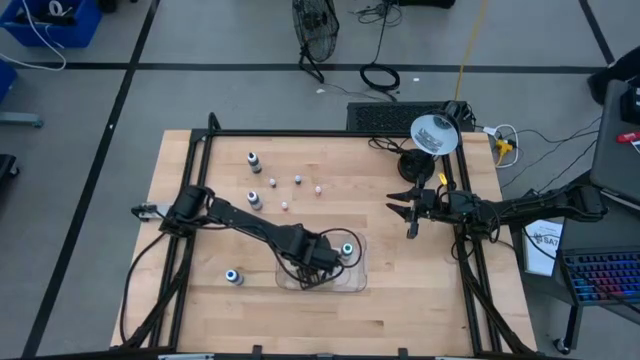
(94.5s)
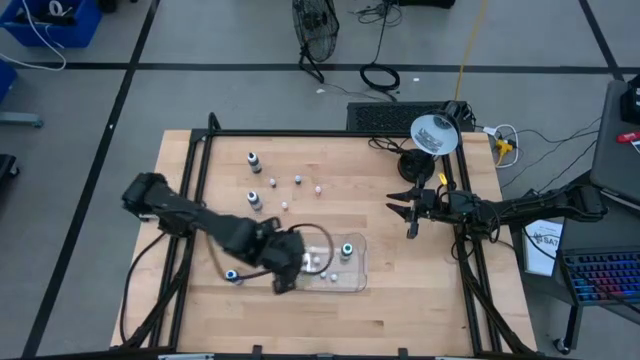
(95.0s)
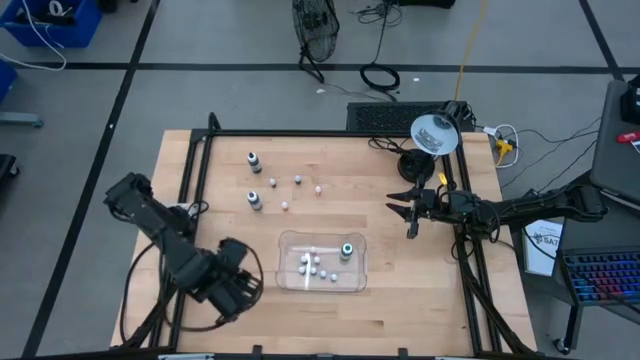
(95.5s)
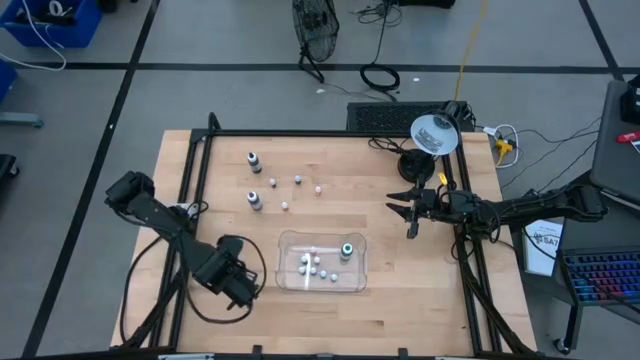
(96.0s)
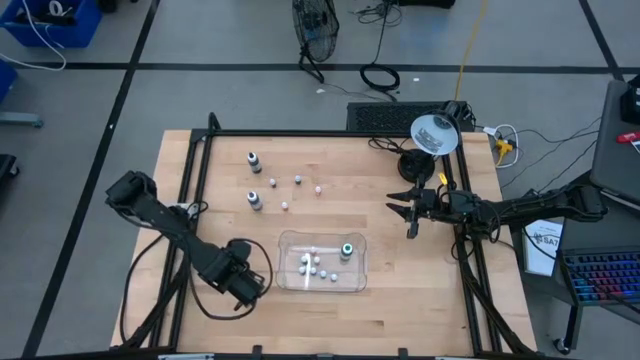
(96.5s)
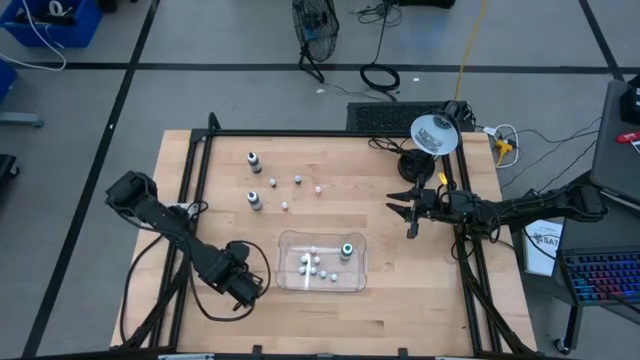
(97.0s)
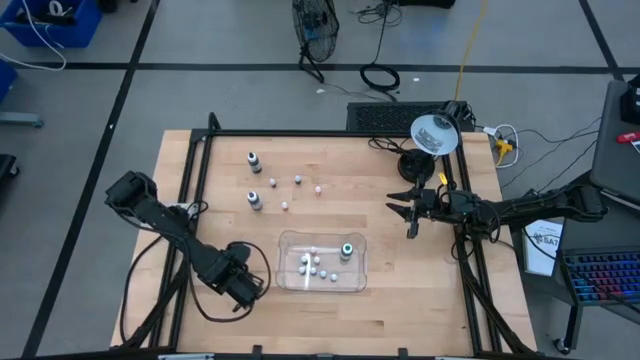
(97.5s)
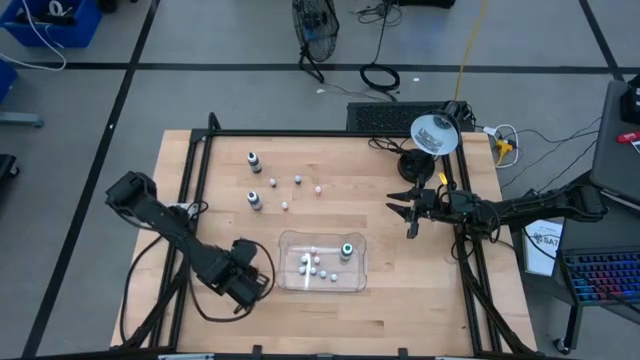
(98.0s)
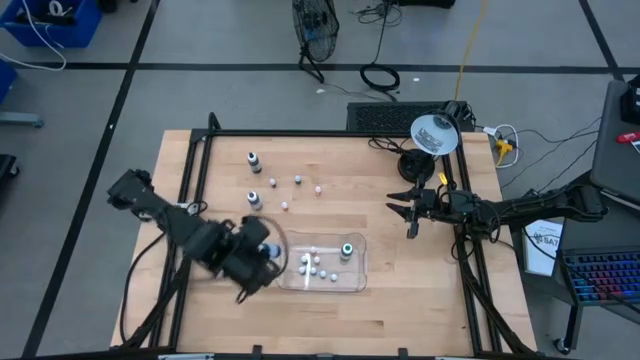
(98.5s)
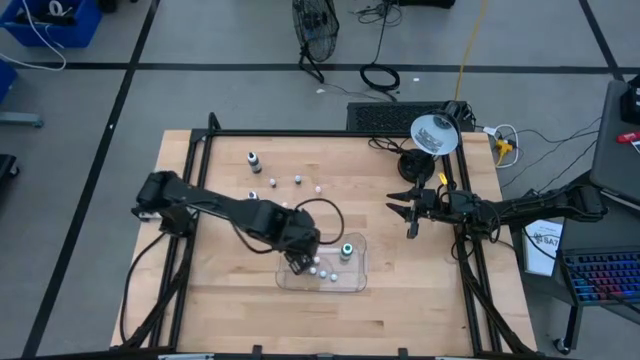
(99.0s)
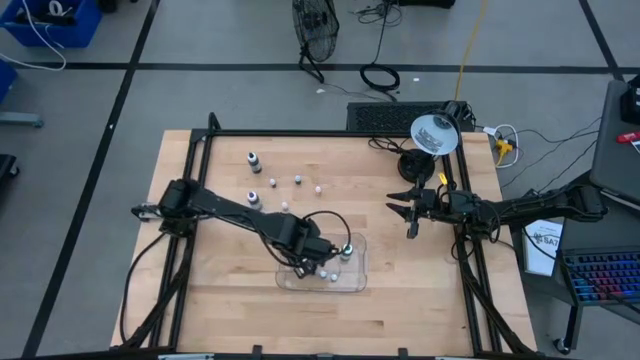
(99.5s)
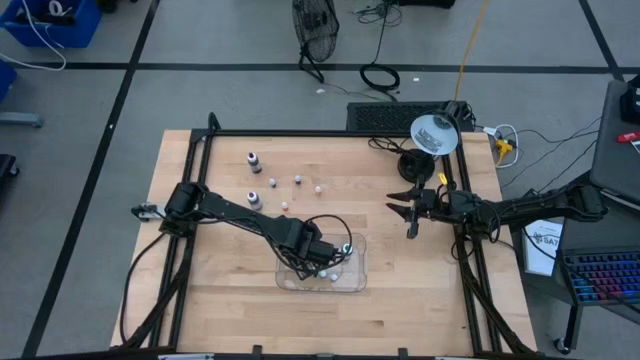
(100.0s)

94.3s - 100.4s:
Task: Pick & Place food coloring
Put the big blue food coloring bottle into the bin

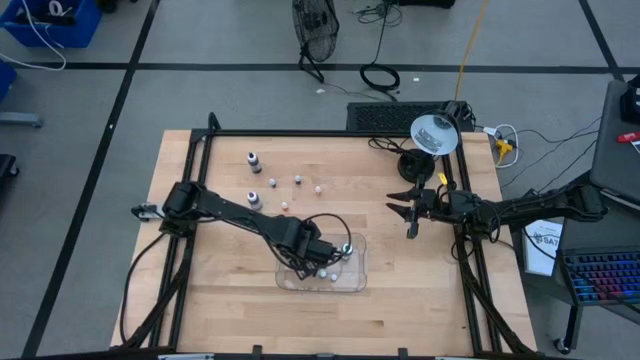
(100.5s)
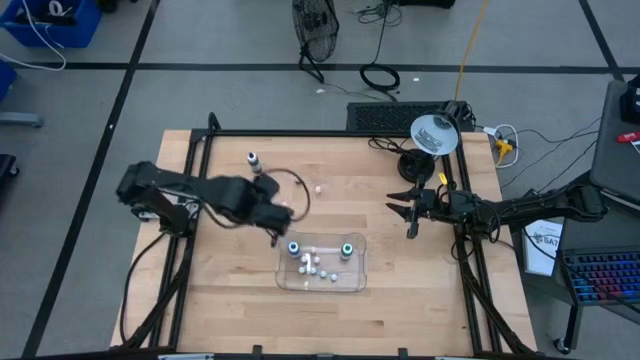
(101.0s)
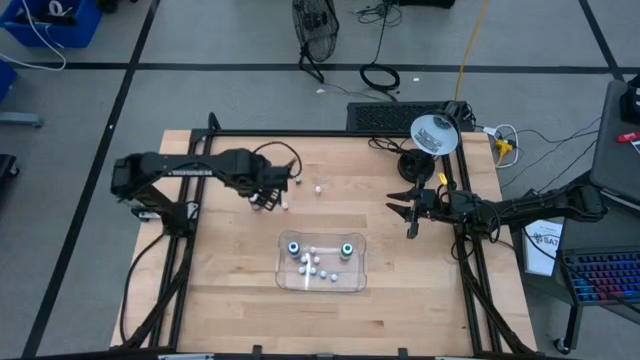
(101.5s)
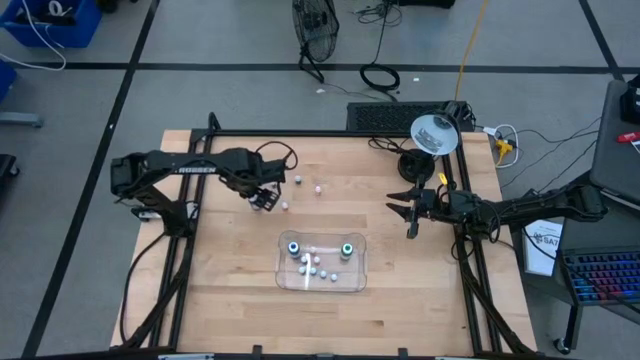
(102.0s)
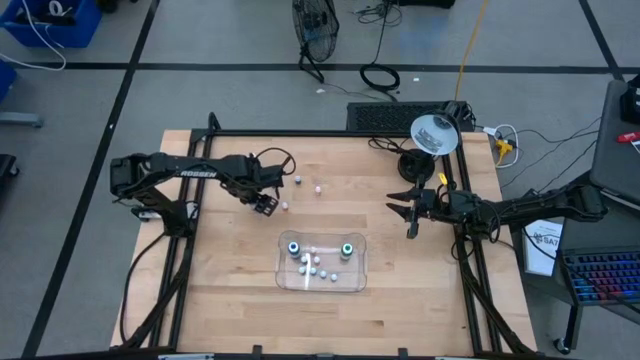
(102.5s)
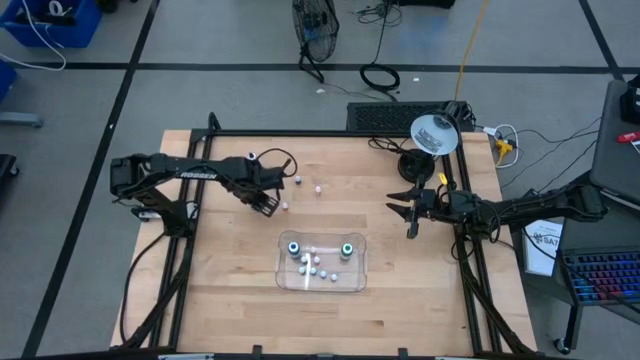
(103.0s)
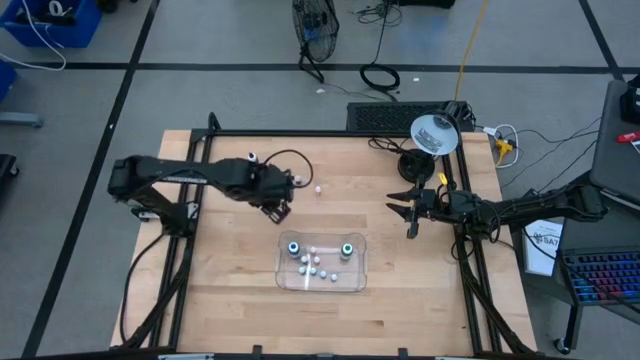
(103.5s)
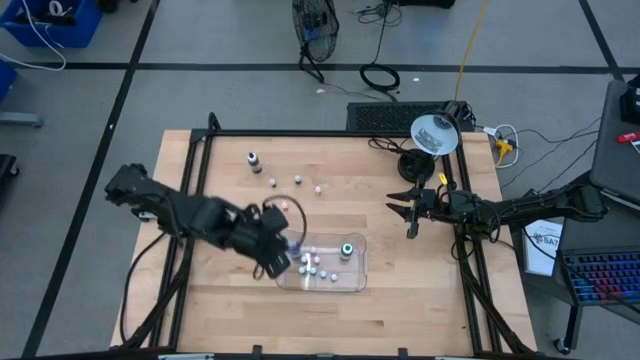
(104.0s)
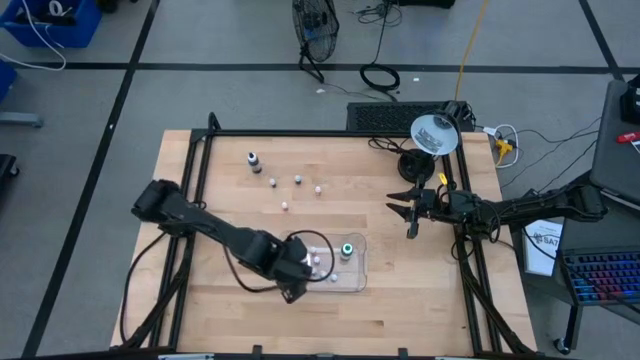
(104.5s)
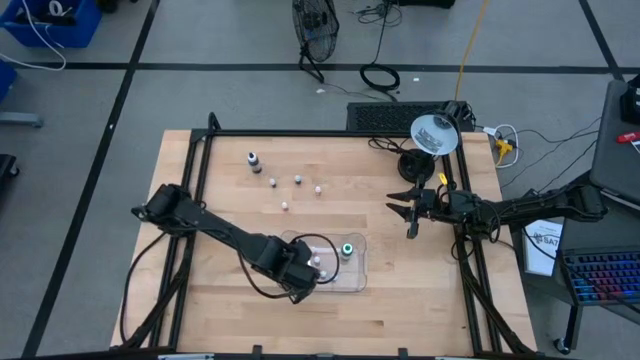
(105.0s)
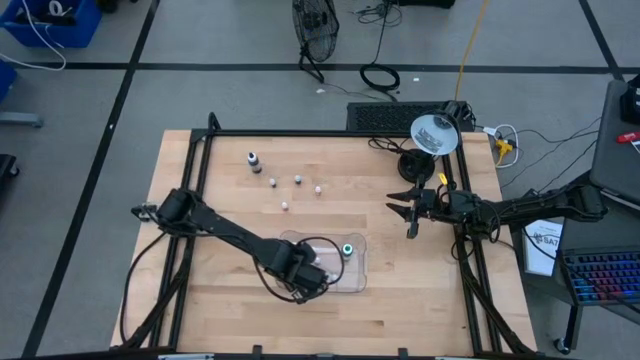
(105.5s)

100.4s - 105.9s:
Put the big purple food coloring bottle into the bin

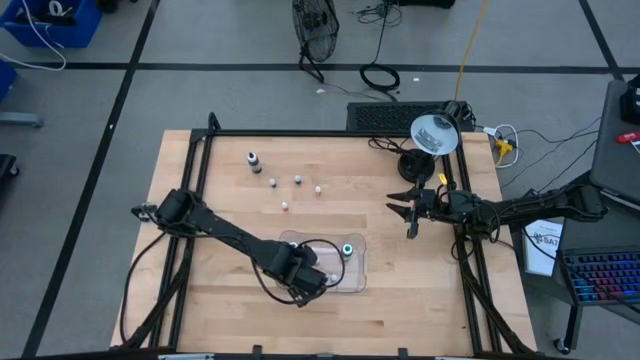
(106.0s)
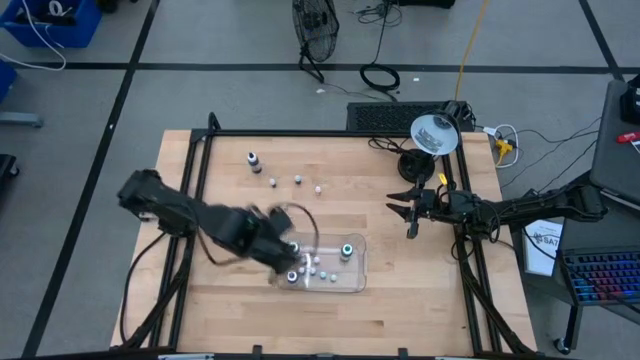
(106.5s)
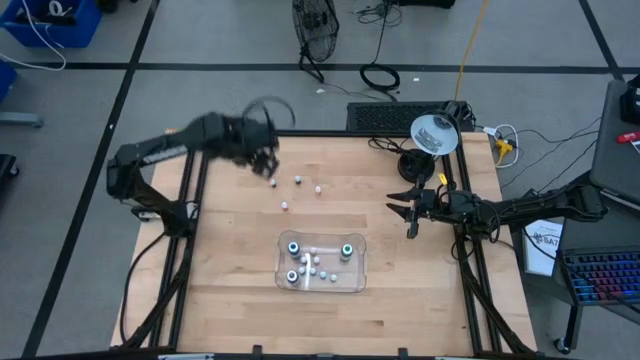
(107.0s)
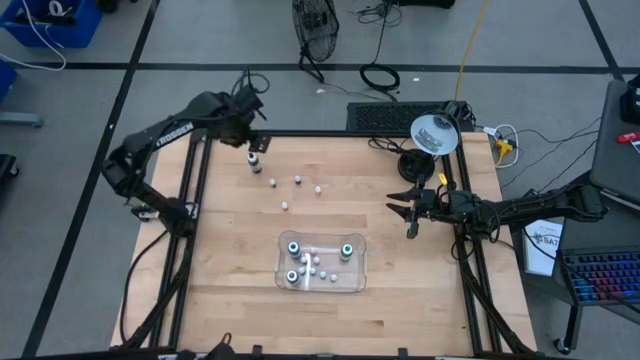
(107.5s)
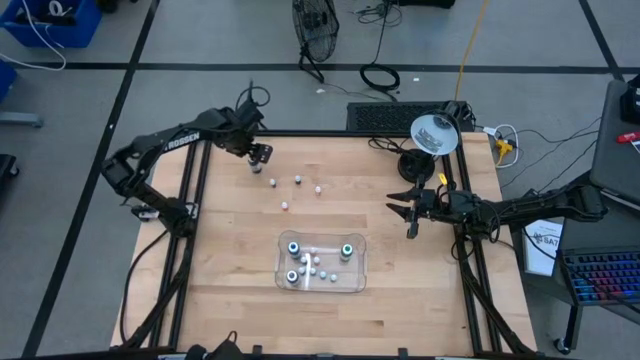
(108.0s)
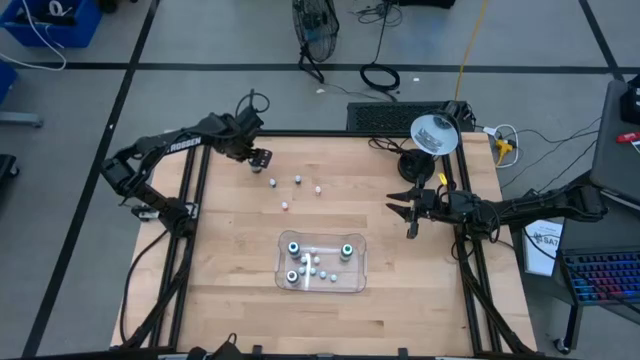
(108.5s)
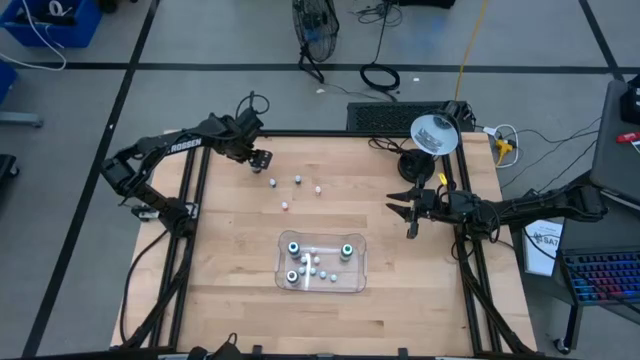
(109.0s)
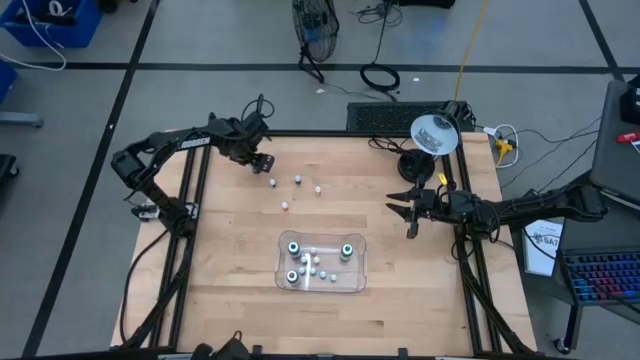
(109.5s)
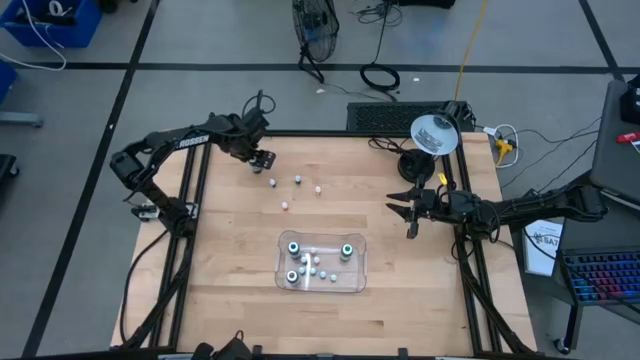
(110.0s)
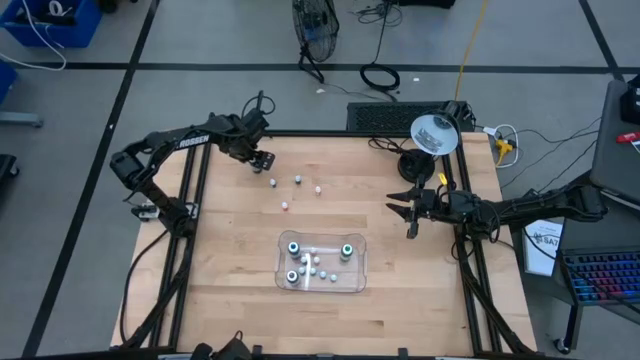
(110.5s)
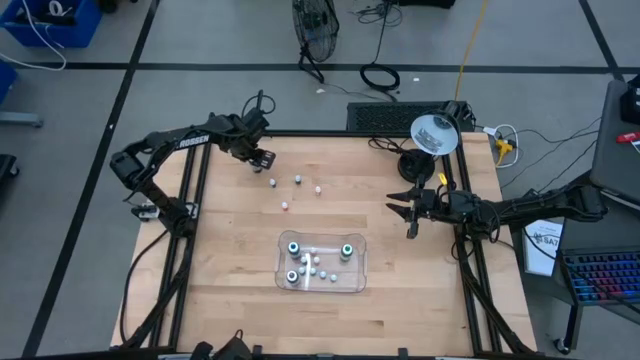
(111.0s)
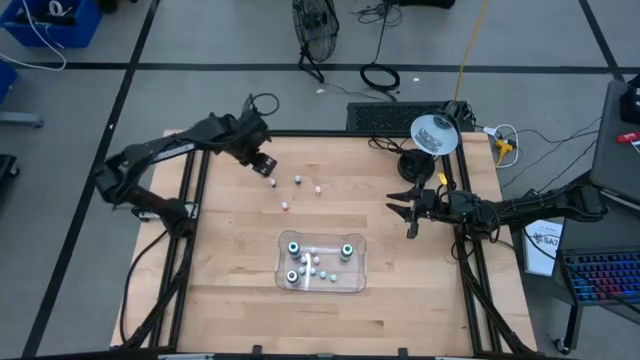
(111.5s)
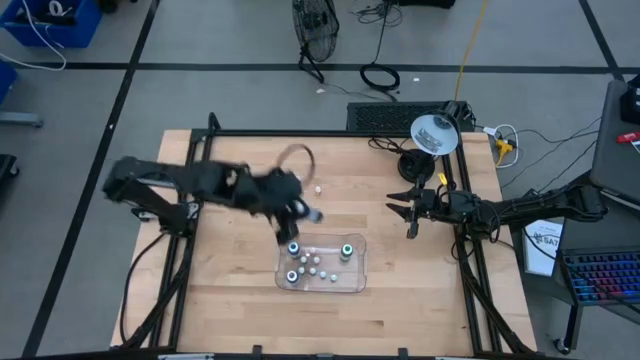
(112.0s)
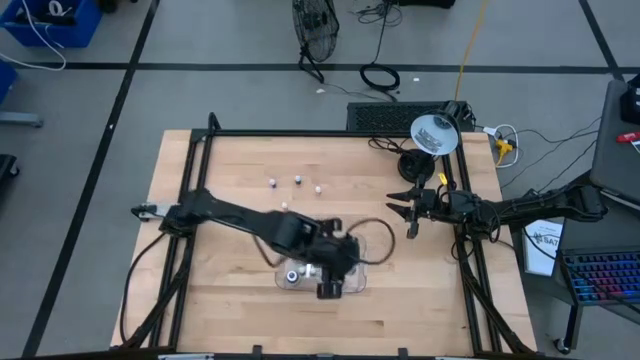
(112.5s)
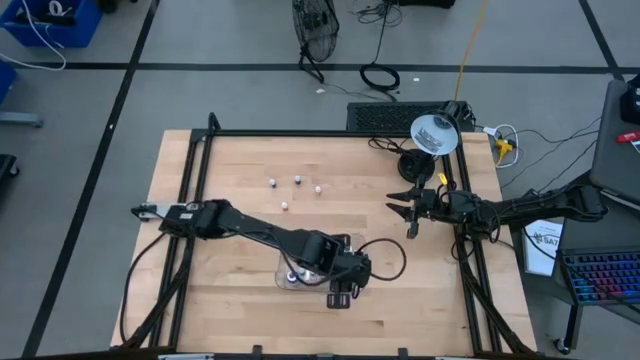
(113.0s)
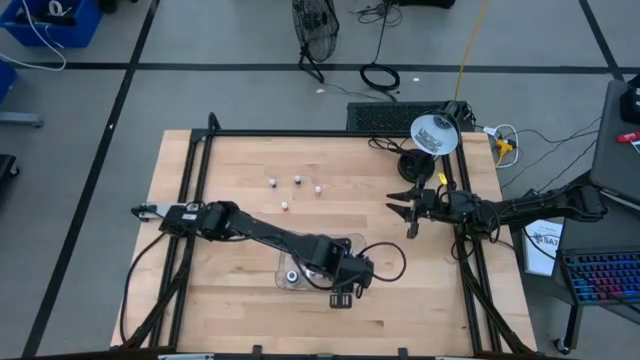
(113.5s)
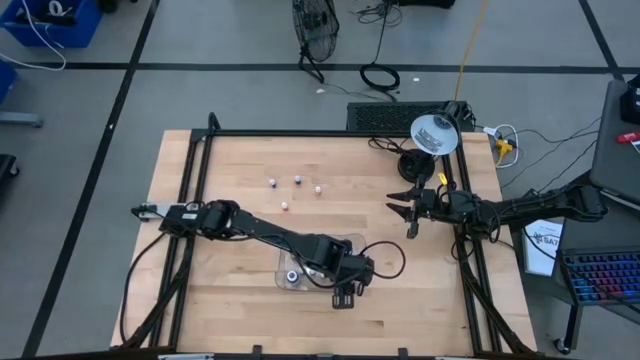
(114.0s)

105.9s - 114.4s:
Put the big black food coloring bottle into the bin

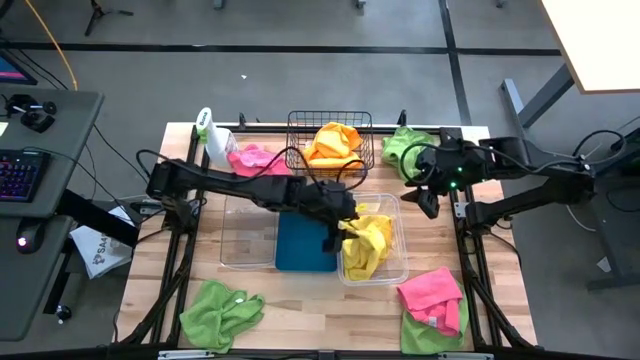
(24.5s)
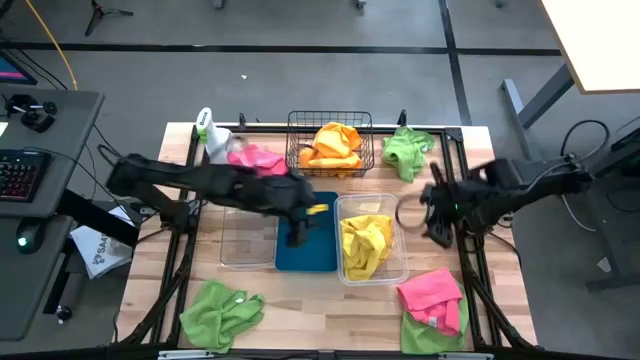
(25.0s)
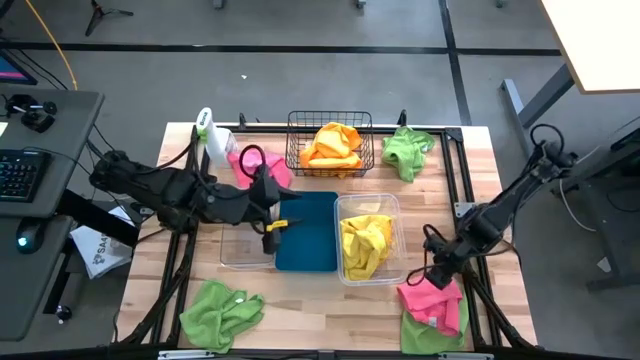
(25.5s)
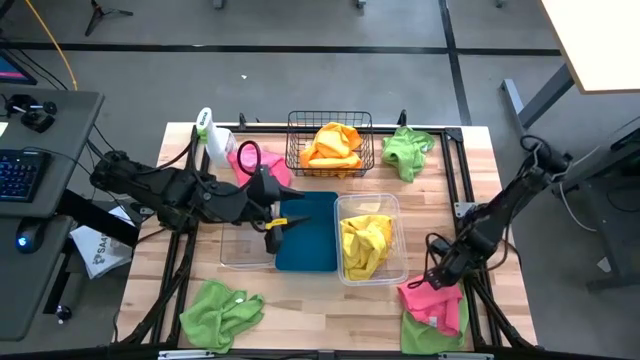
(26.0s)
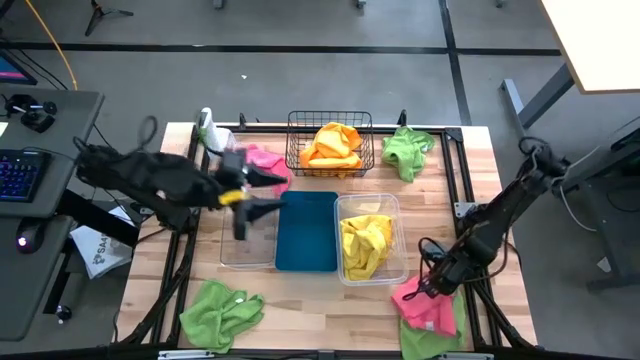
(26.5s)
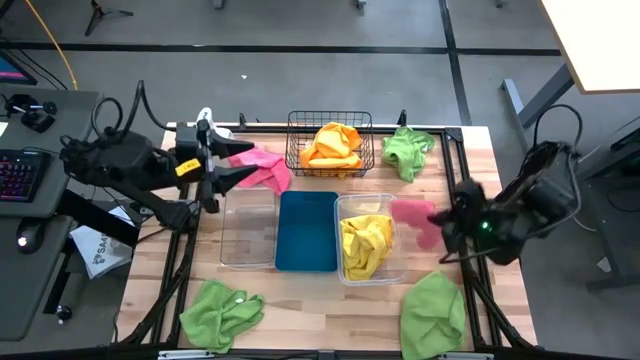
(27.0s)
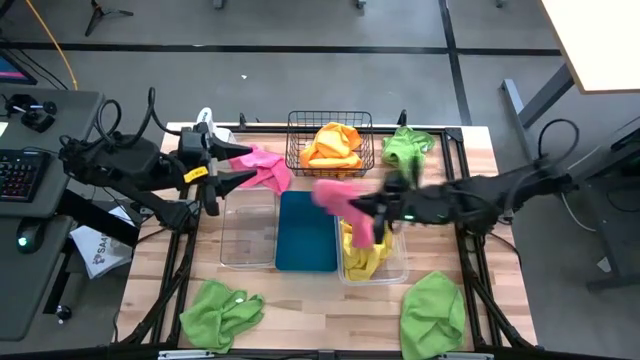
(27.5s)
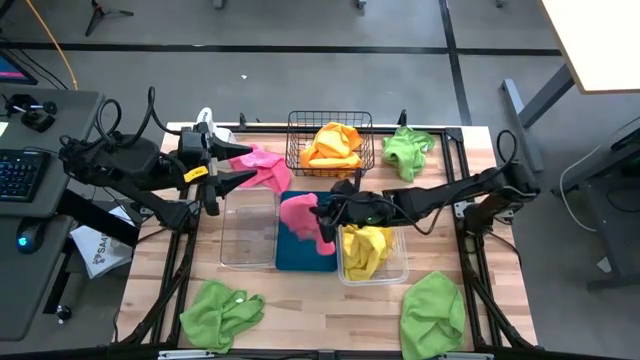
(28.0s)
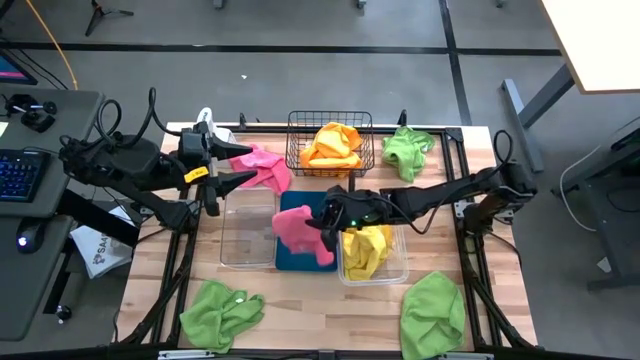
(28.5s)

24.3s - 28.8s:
Task: Sort microfiber towel by color & place in baskets
Put the bottom pink microfiber cloth into the blue bin
